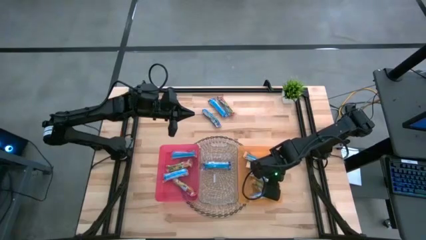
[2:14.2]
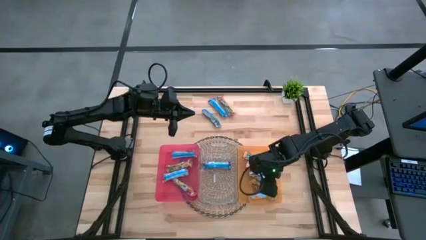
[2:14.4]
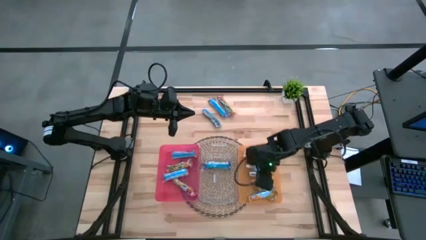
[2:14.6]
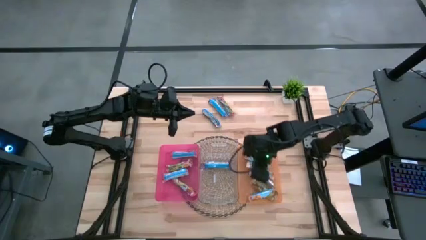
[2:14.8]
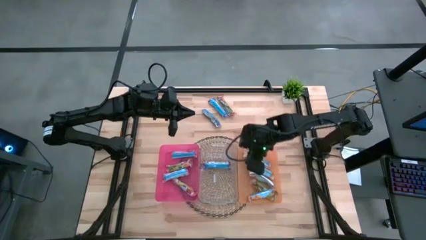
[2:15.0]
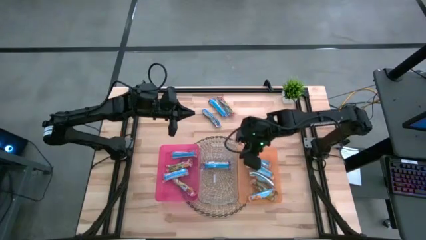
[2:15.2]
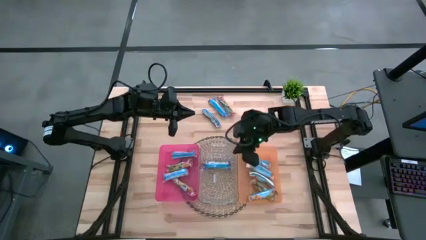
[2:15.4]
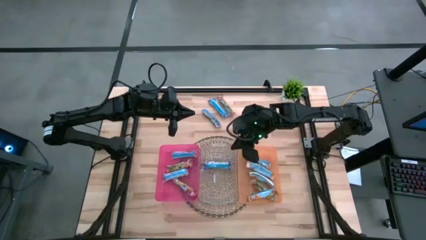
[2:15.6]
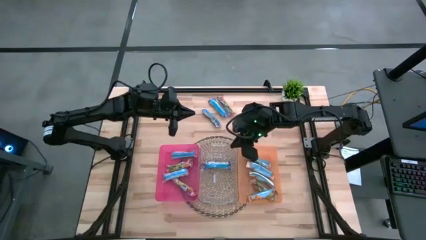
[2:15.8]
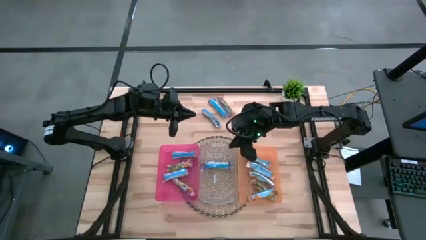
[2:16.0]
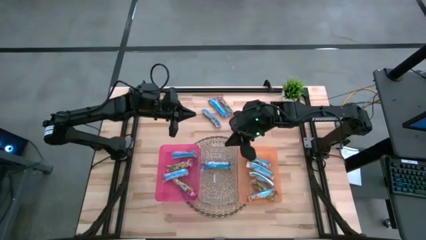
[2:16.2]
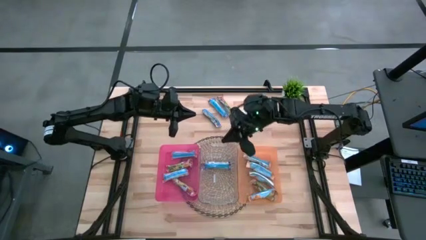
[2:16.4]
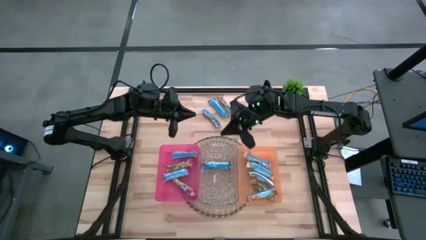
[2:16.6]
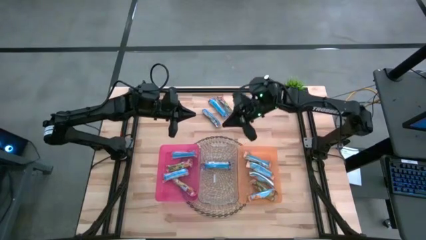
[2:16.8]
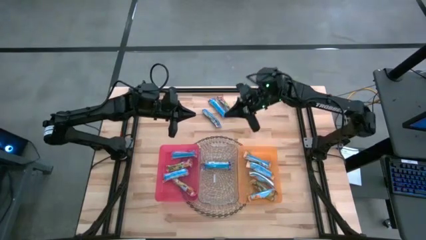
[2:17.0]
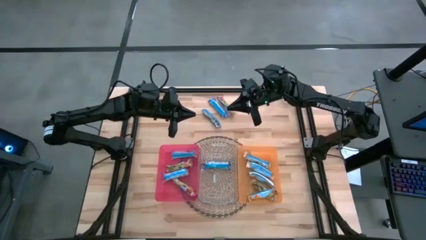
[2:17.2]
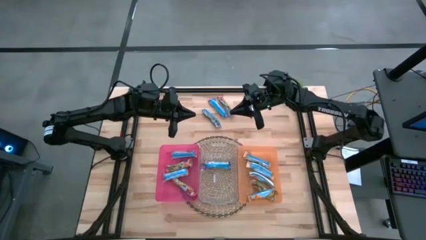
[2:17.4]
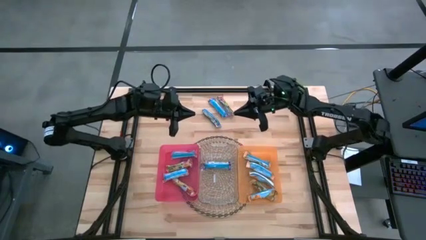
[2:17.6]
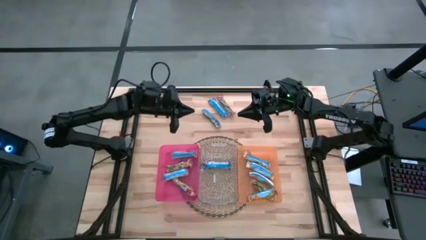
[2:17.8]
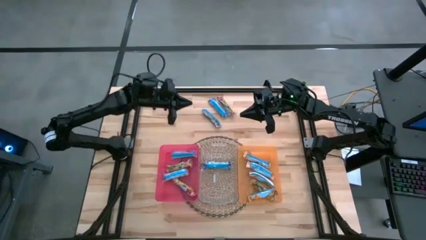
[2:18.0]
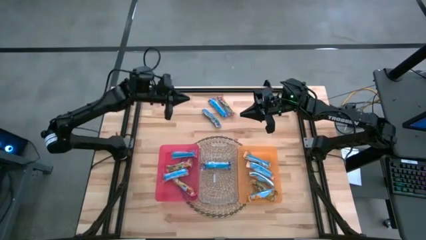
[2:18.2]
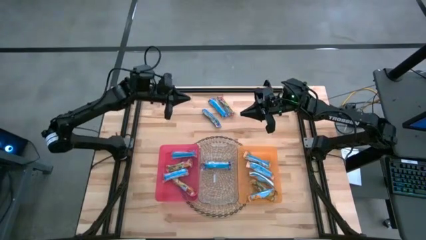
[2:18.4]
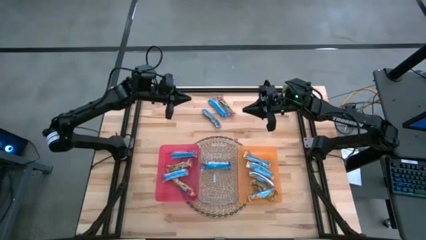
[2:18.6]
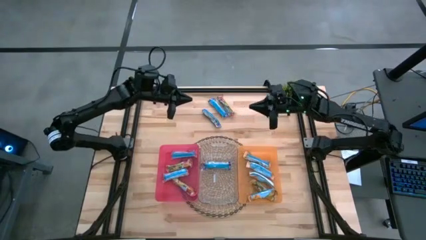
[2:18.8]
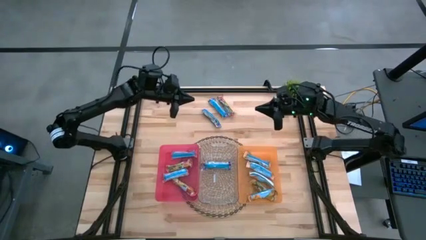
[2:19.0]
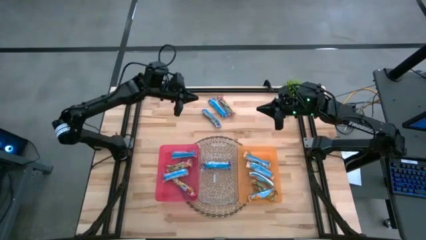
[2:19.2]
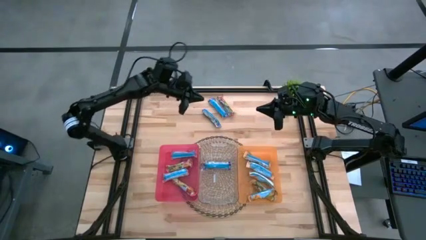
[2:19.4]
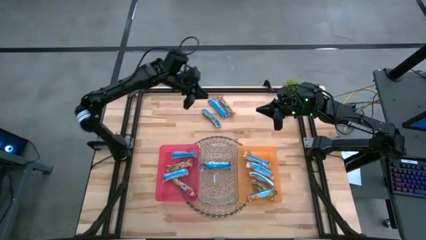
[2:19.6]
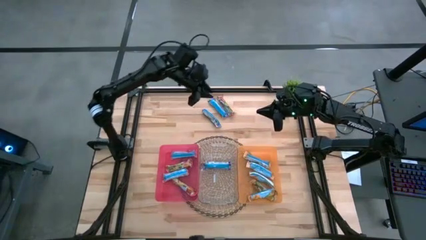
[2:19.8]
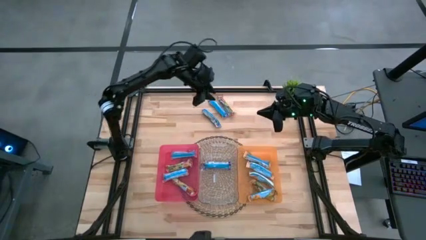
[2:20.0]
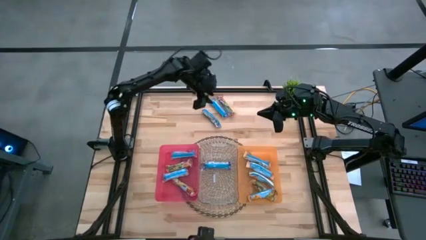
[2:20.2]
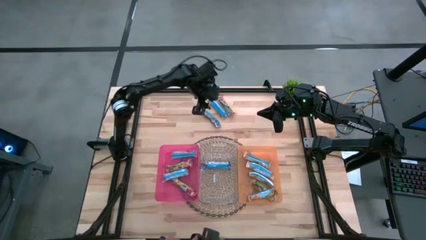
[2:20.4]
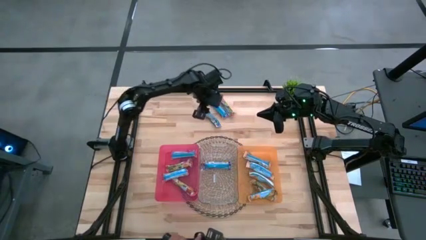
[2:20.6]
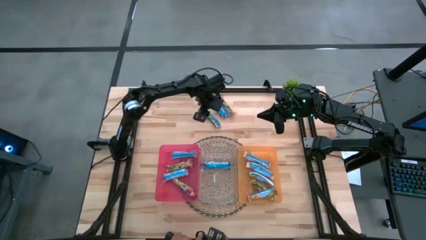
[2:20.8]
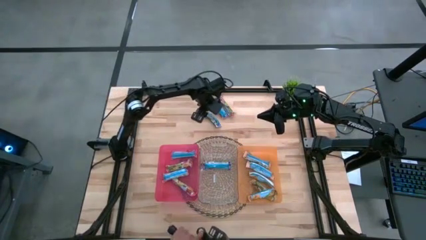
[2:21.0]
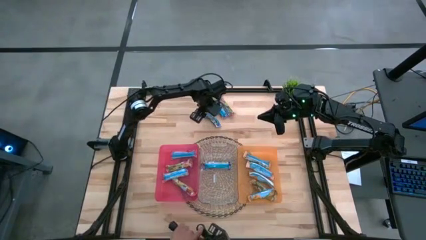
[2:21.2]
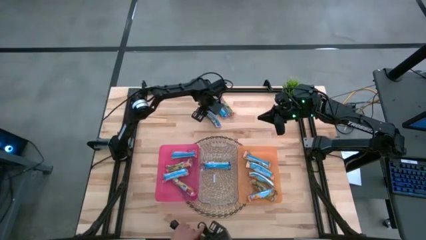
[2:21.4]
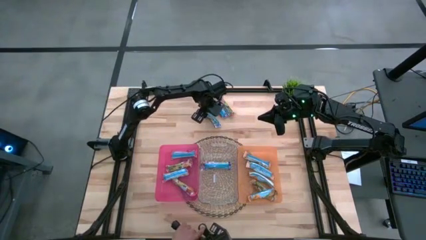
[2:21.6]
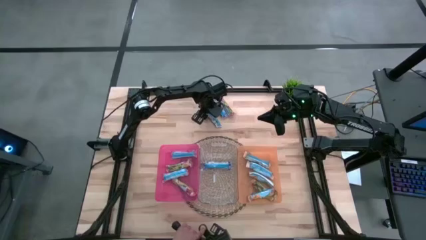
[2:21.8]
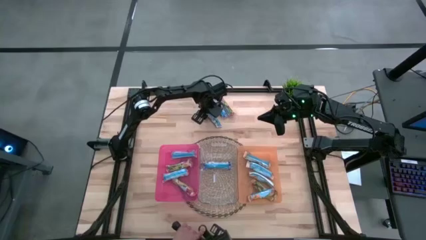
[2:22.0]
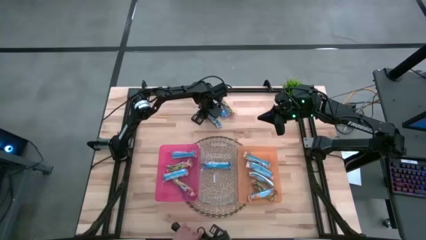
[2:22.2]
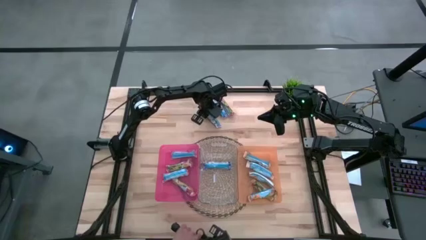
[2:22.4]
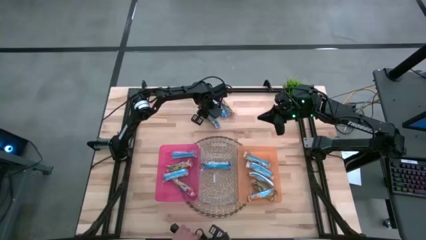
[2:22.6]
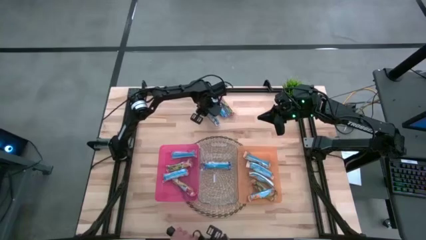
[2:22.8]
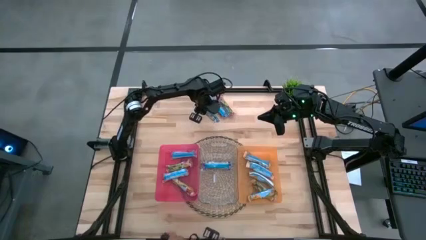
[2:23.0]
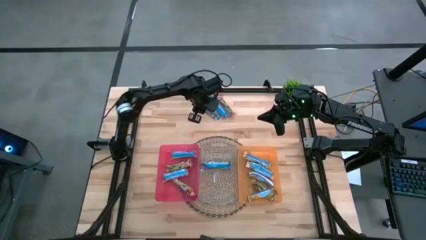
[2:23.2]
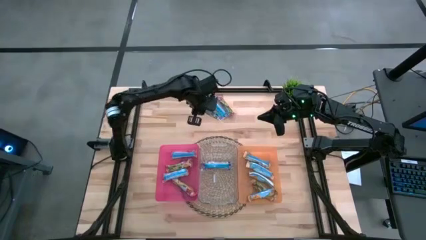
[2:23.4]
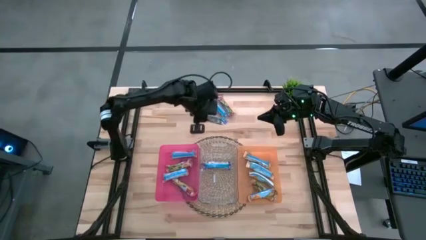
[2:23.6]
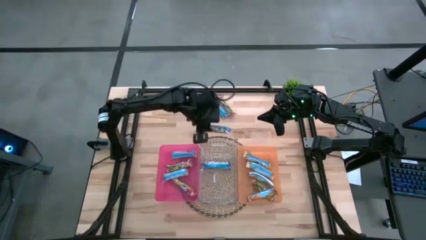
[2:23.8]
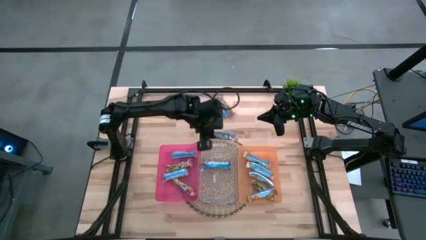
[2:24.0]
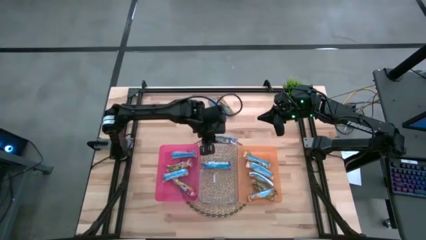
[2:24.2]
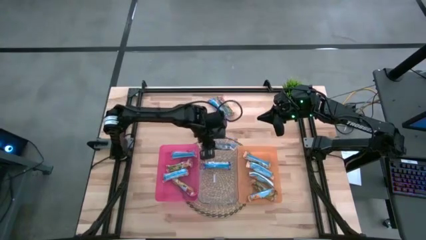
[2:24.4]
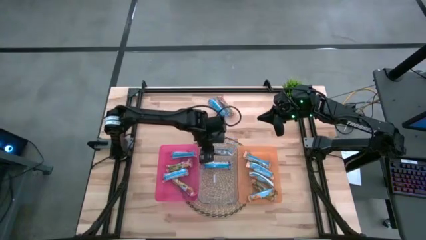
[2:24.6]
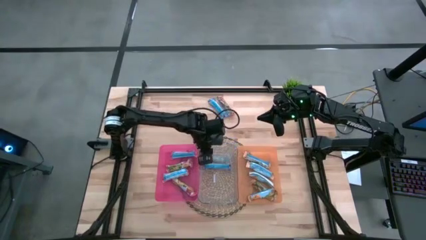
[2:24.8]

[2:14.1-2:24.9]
Task: Pick and place Granola Bars by type
Put the blue granola bar into the transparent bin

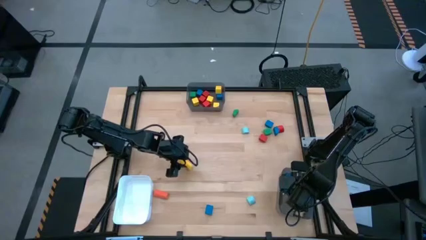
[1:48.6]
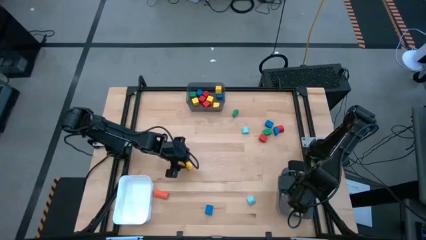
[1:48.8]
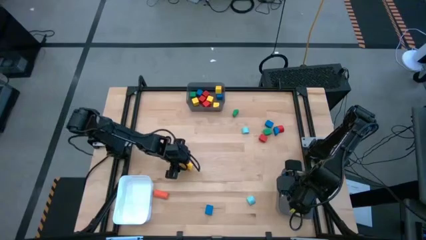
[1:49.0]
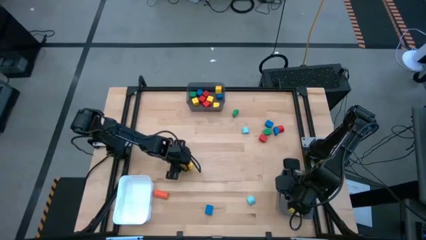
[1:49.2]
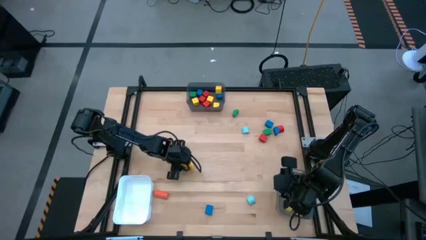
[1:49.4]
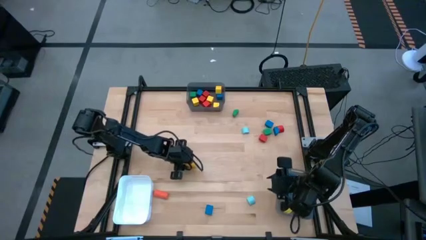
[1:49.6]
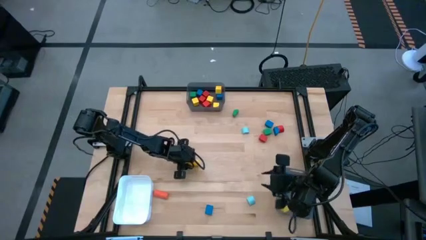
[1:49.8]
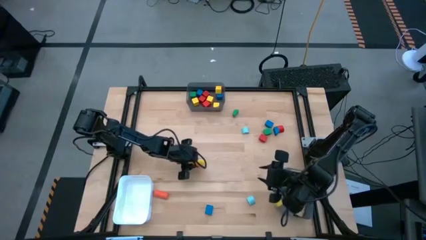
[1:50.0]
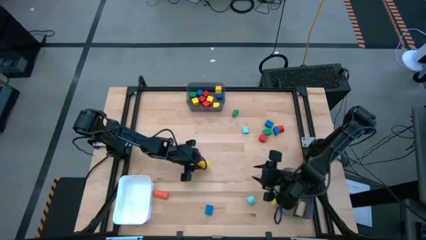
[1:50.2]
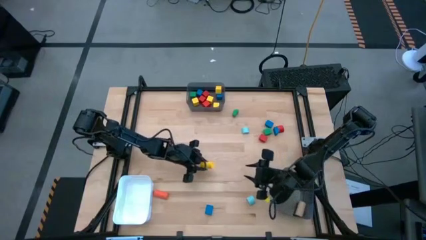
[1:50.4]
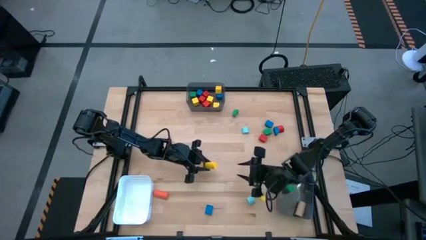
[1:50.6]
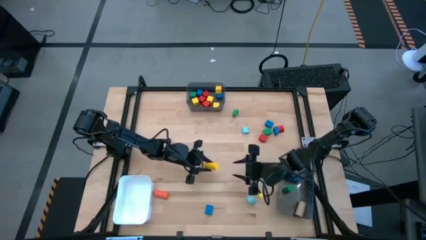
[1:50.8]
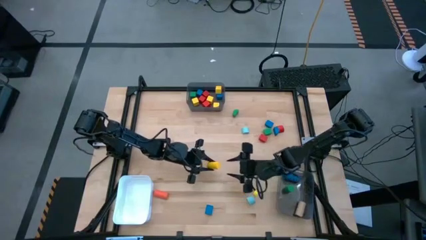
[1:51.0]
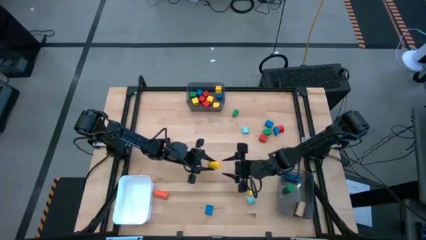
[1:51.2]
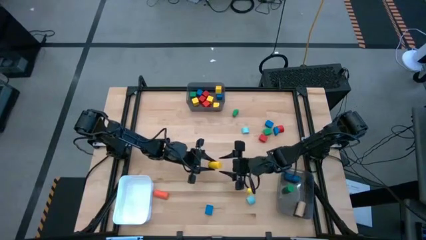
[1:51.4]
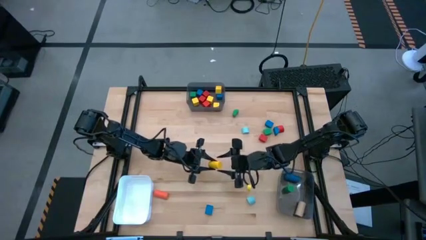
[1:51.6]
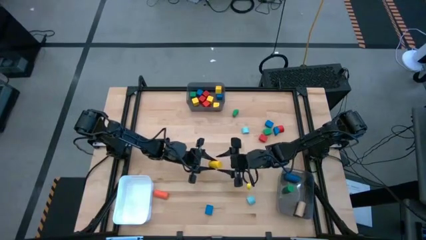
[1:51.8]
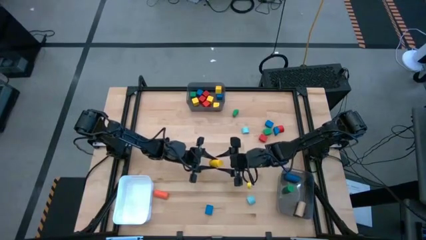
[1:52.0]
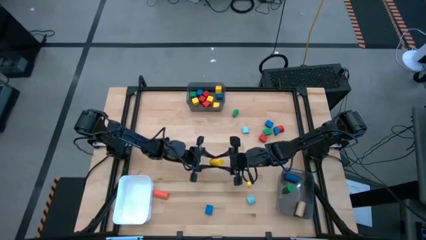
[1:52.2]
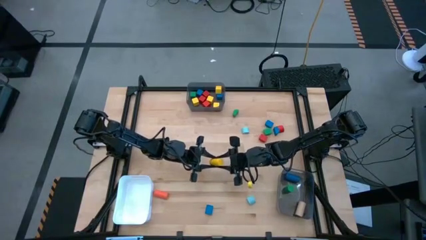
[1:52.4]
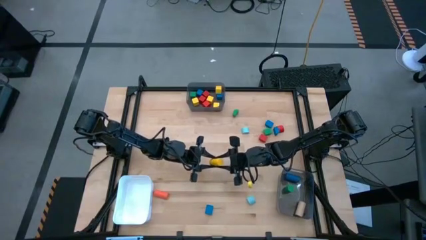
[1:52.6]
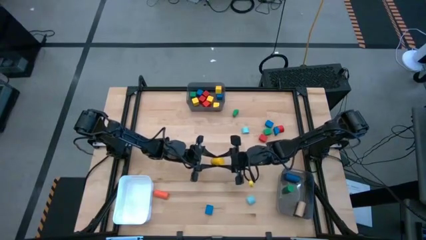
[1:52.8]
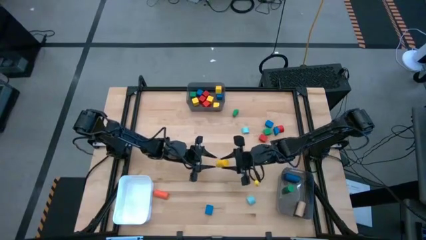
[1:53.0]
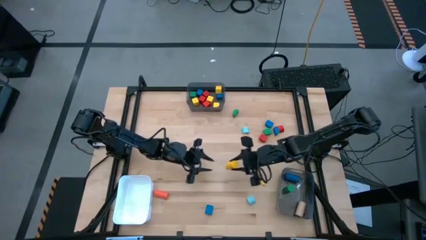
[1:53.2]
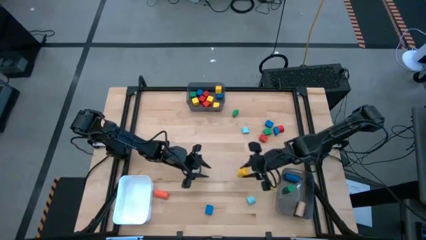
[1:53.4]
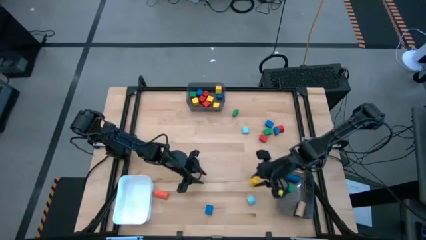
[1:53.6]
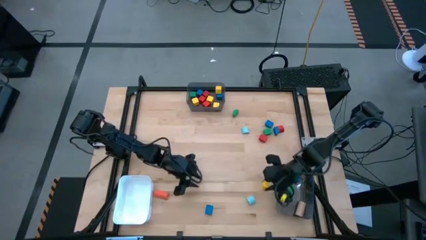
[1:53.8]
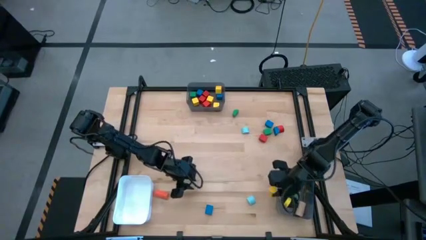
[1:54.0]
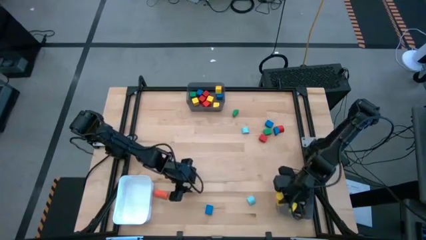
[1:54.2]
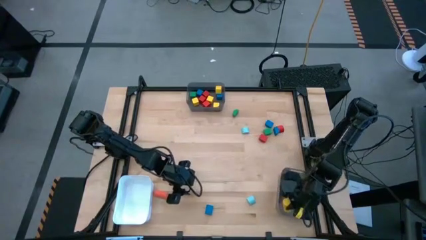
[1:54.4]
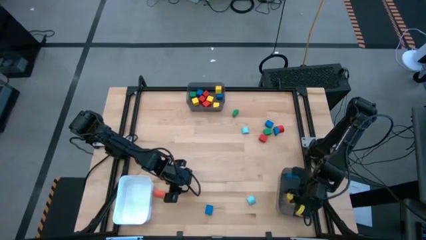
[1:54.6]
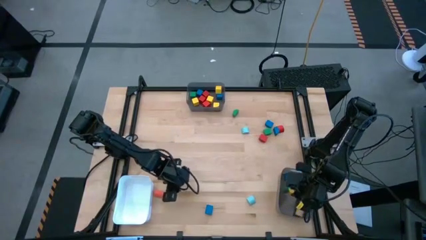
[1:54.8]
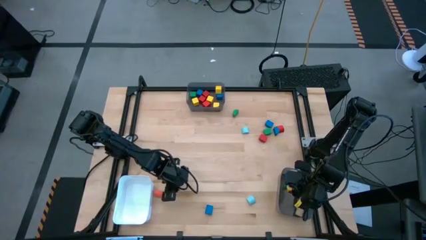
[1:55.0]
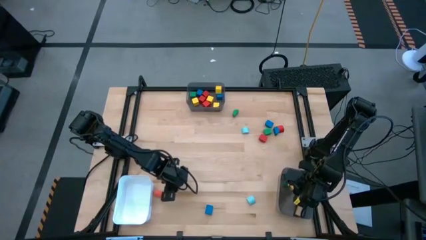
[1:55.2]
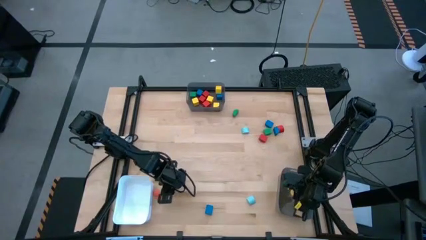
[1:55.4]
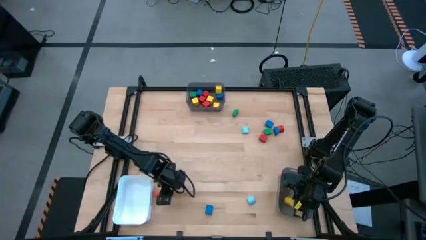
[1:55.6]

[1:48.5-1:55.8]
Task: Sort blocks by size
Put the yellow cylindrical block into the bottom black bin
